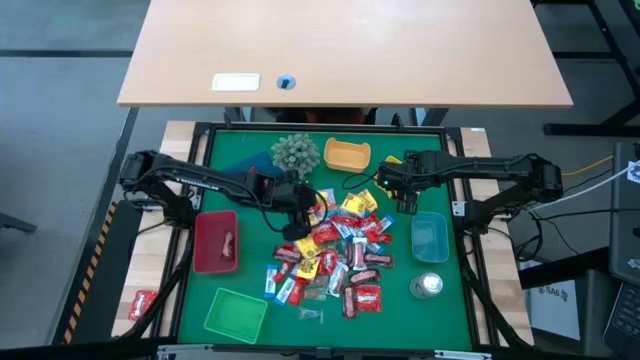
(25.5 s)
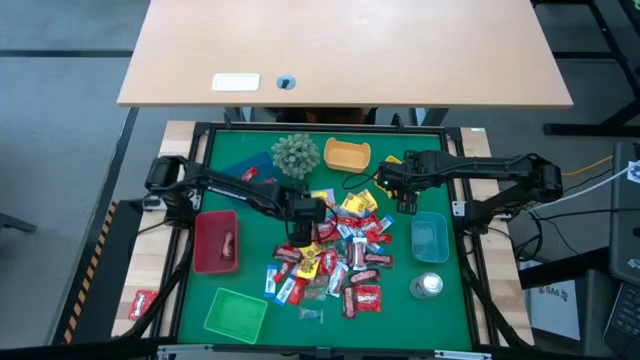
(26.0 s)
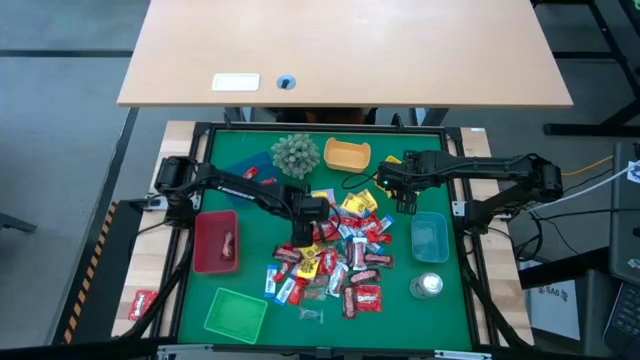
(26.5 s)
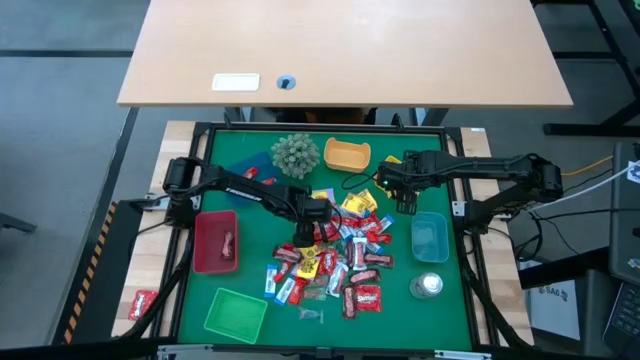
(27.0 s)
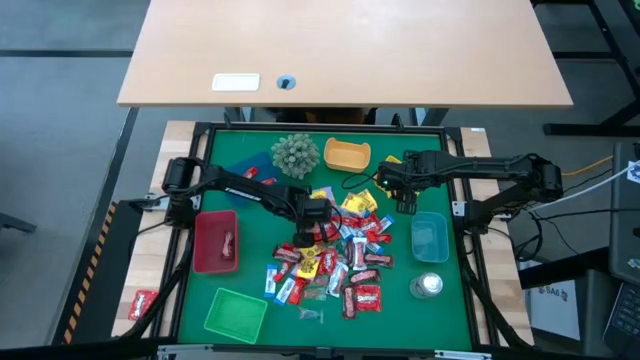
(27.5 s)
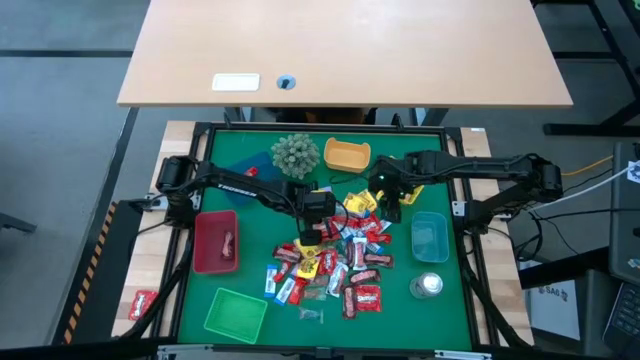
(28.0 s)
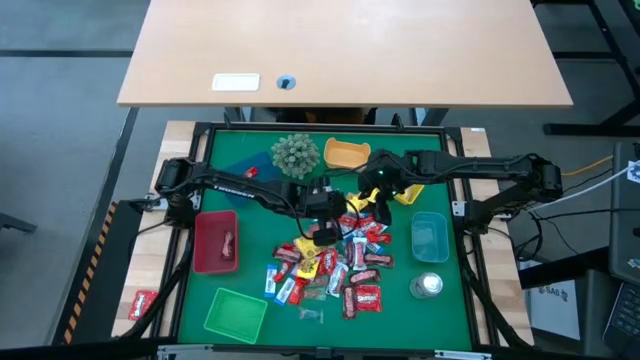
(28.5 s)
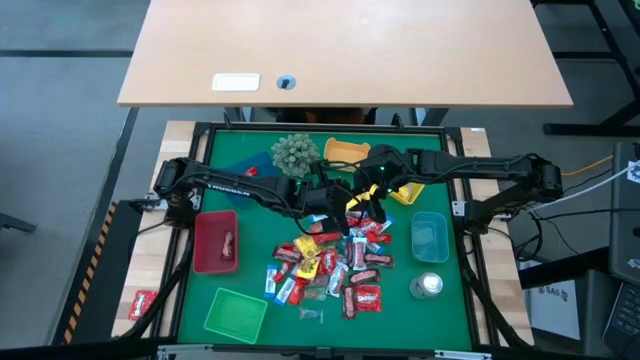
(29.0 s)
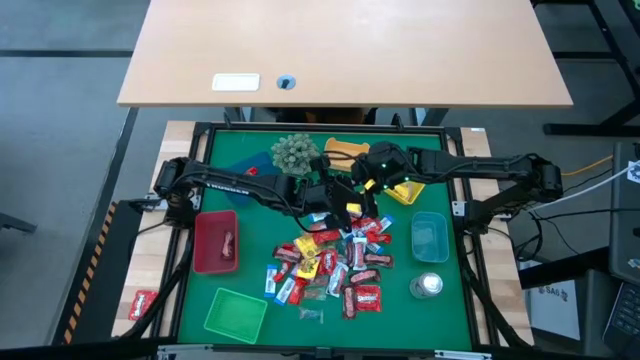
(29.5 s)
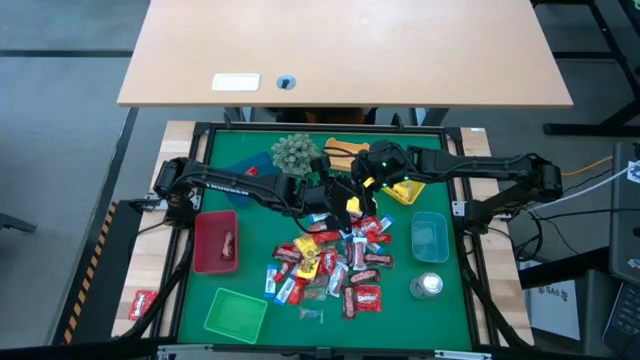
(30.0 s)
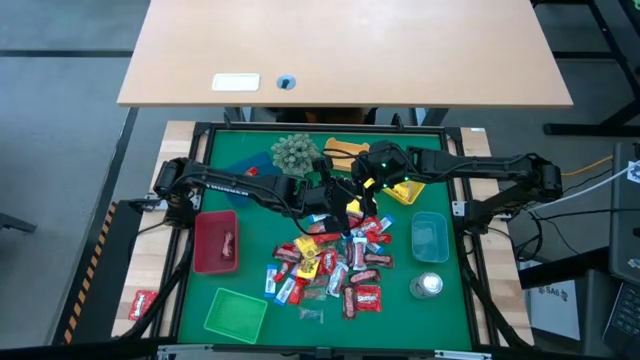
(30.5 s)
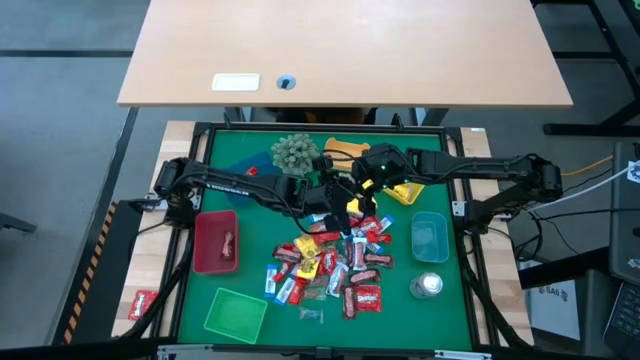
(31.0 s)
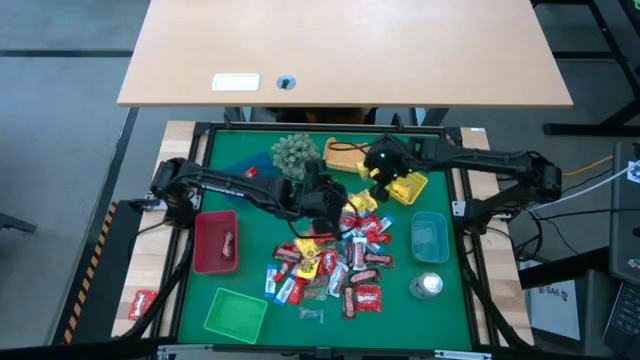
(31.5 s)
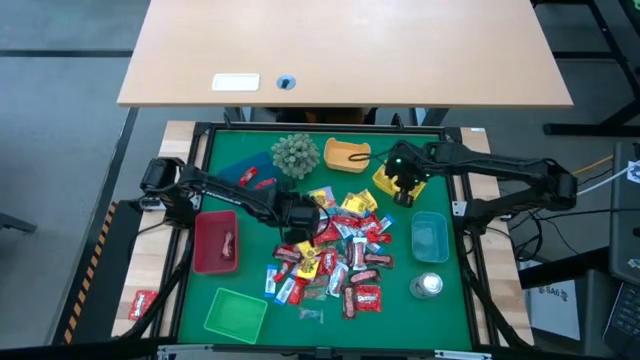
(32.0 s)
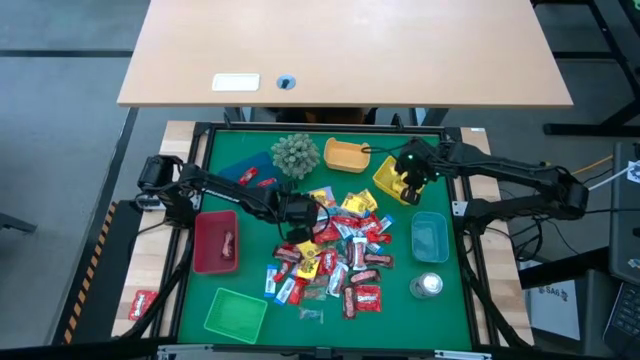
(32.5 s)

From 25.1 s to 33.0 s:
Task: Sort candy
Put the yellow candy into the yellow bin

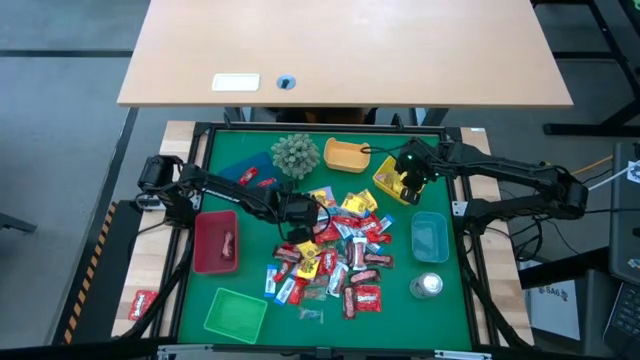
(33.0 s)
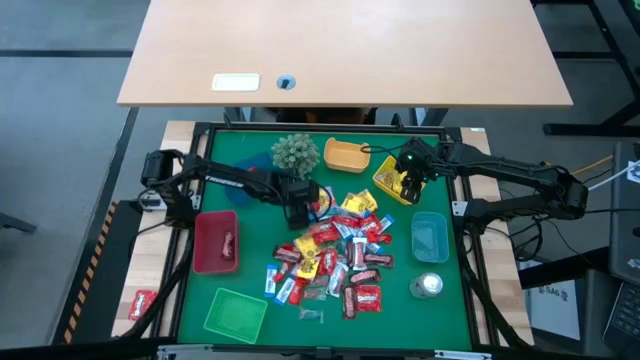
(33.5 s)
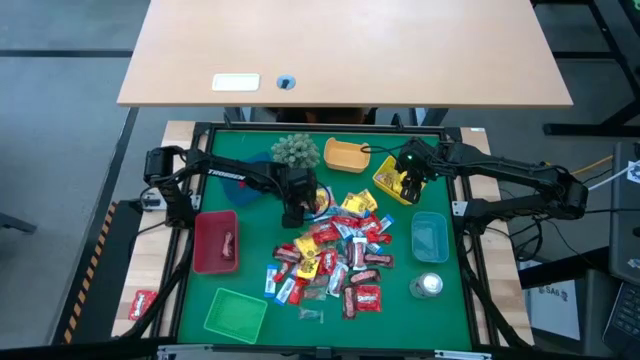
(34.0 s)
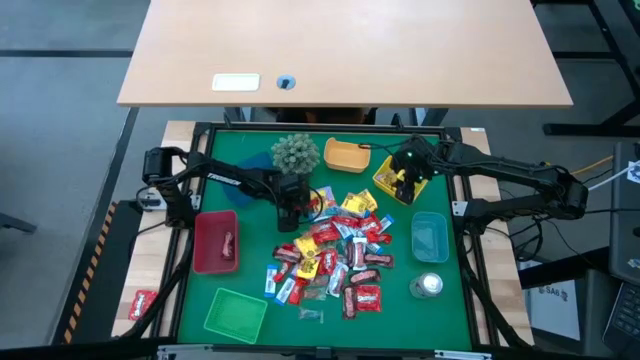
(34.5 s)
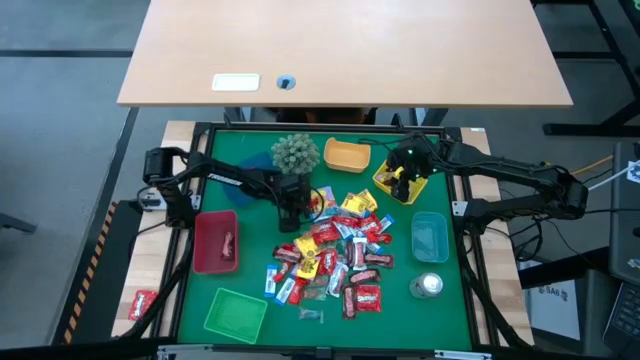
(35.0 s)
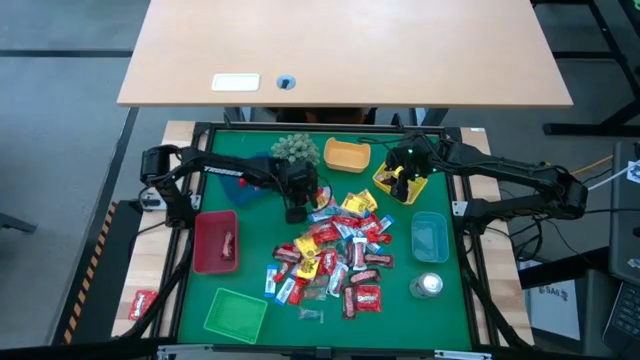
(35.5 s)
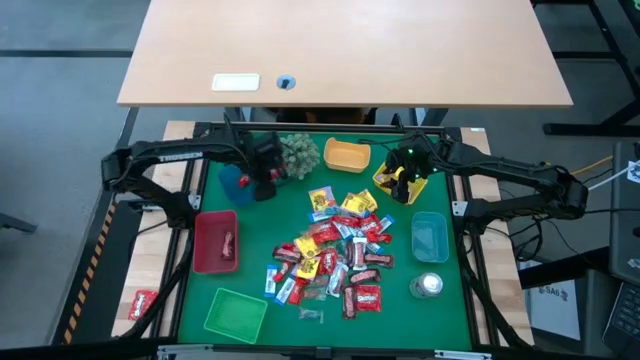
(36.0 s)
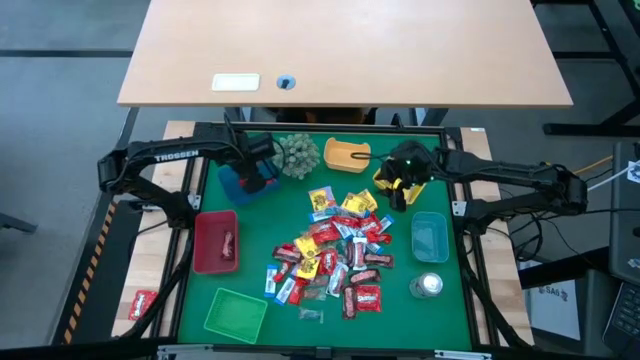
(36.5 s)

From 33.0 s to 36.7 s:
Put the red chocolate into the blue bin

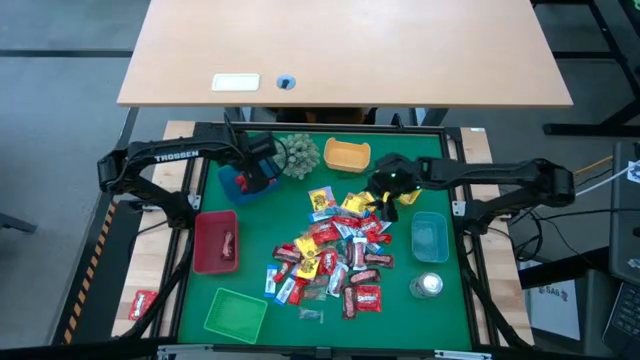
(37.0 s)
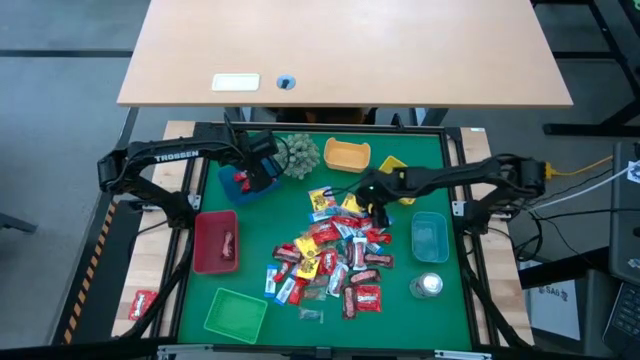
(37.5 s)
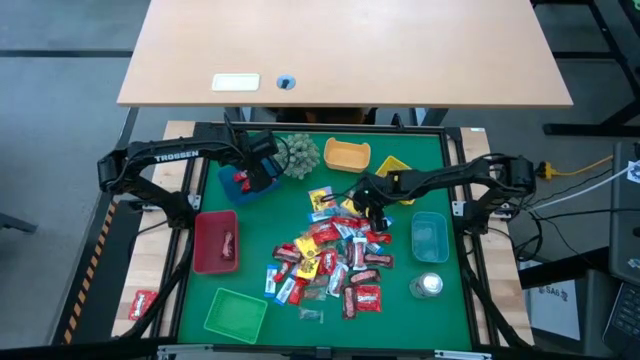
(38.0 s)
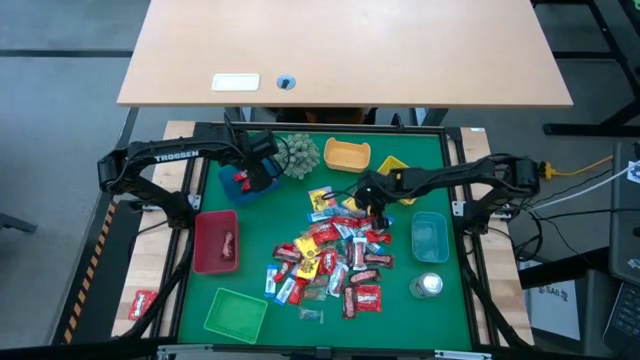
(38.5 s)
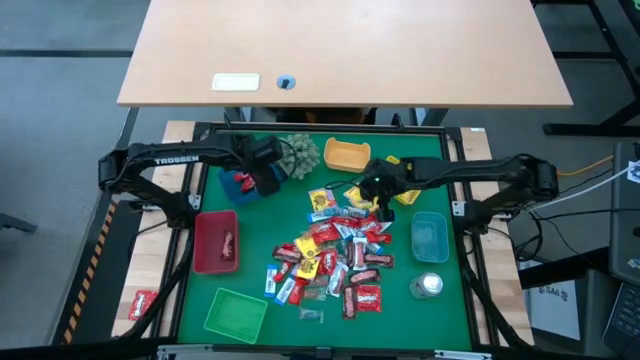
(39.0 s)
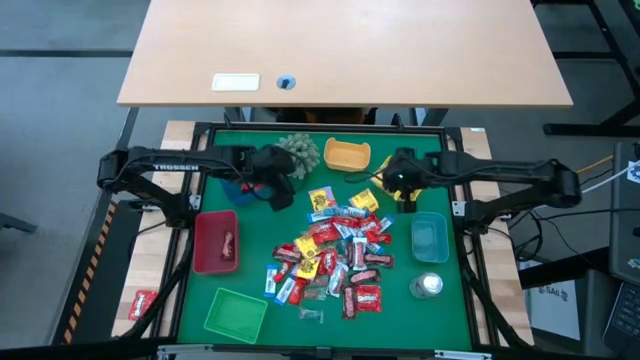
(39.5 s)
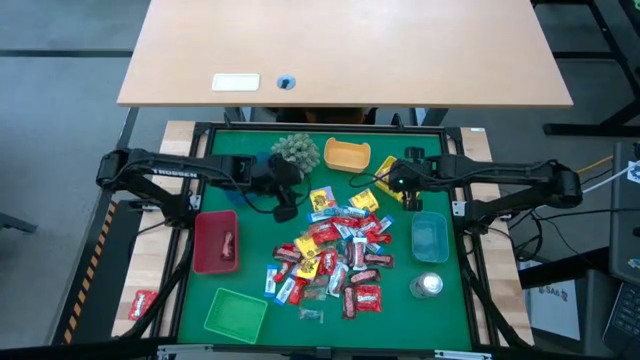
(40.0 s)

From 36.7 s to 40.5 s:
Put the yellow candy into the yellow bin

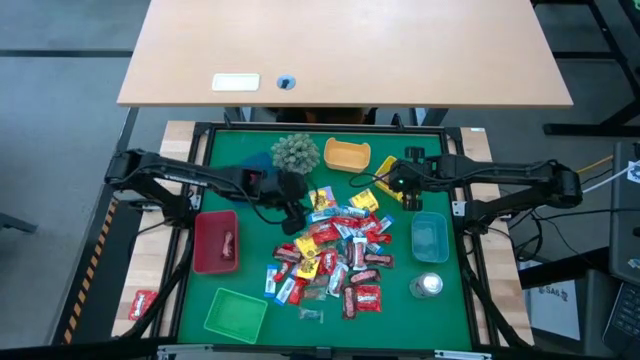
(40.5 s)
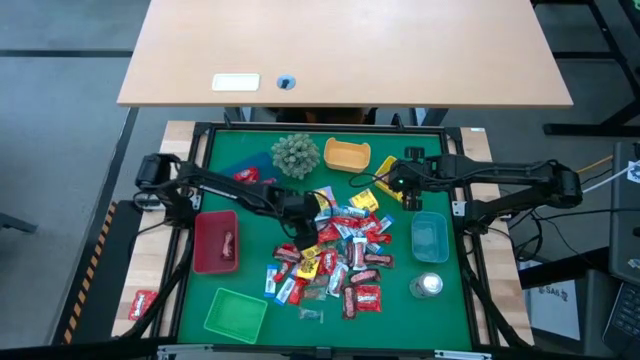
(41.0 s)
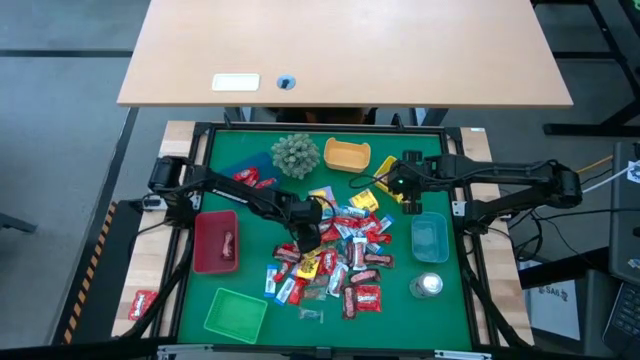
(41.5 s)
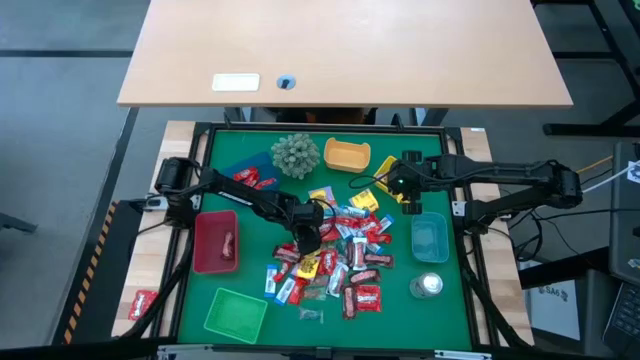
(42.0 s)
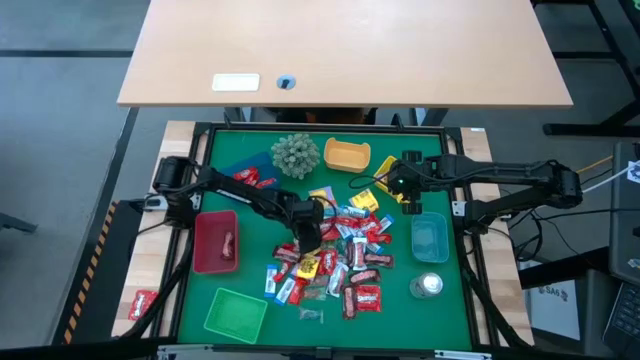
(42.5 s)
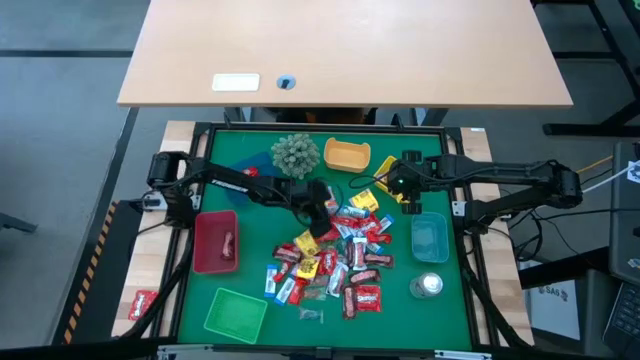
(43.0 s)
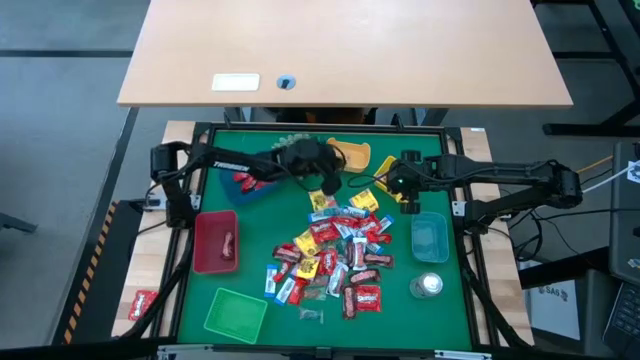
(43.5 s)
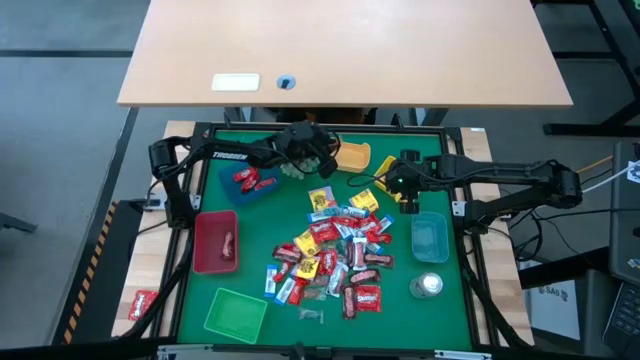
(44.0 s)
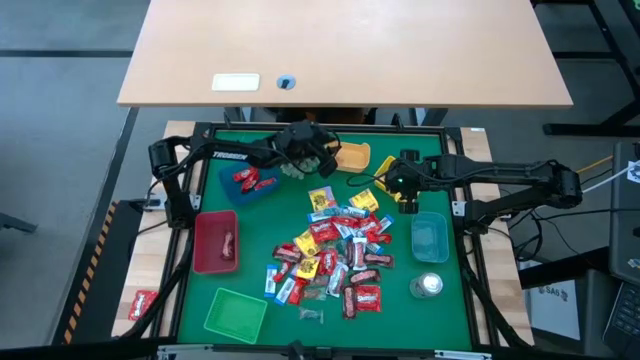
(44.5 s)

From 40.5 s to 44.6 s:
Put the orange gummy into the orange bin

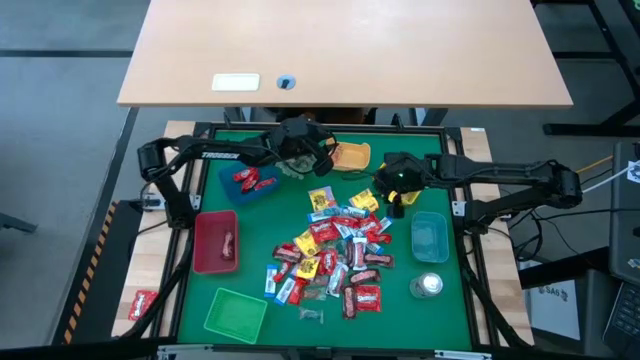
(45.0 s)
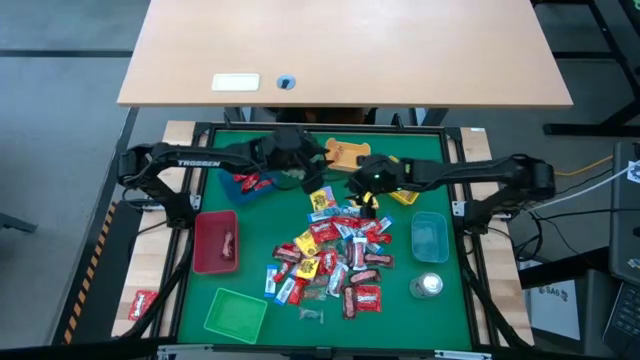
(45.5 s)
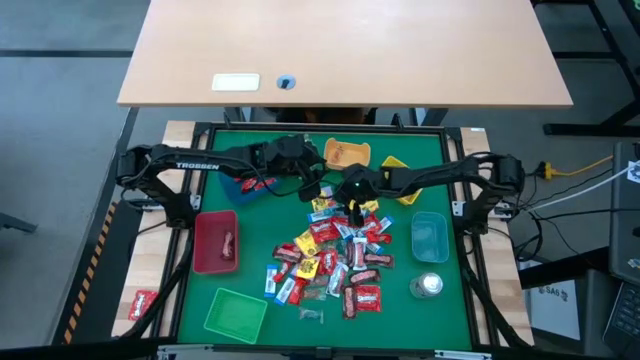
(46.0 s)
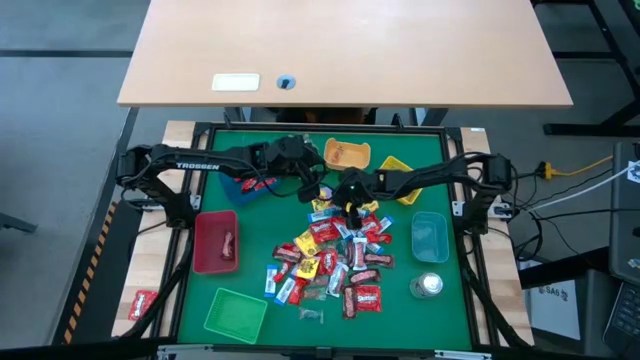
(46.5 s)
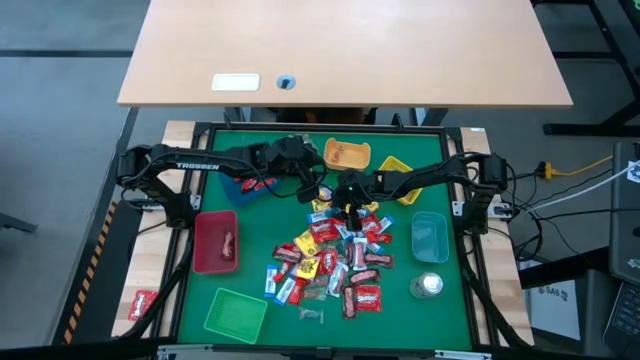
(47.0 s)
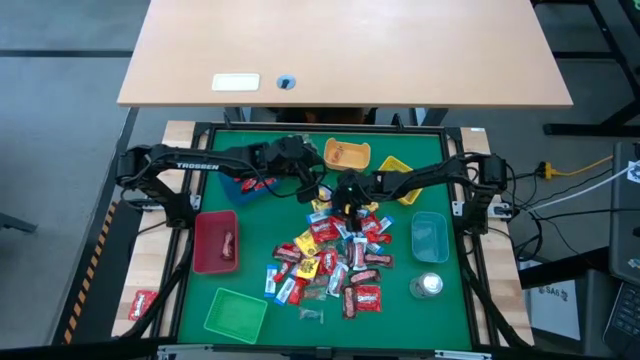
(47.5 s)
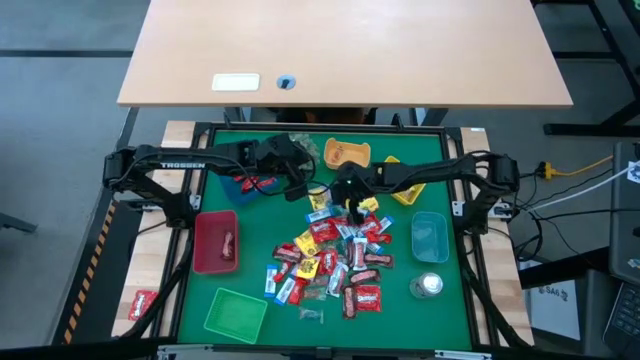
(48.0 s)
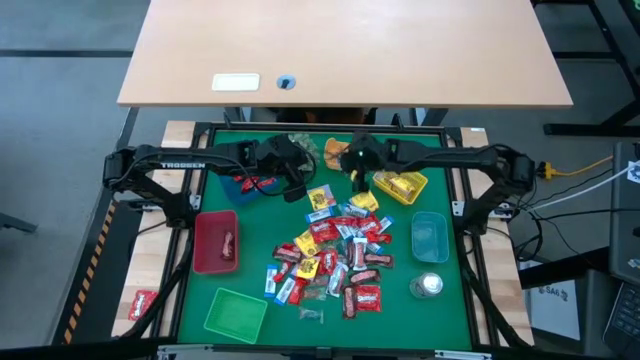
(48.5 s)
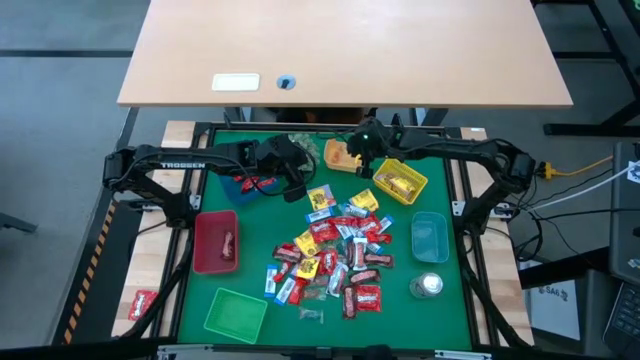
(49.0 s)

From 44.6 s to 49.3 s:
Put the blue gummy into the orange bin
